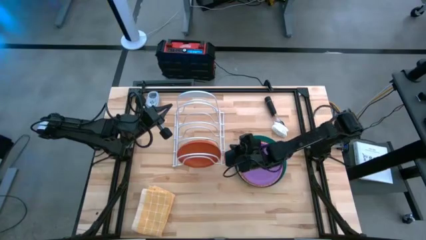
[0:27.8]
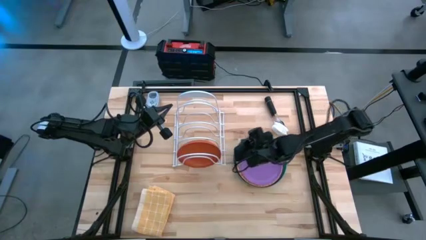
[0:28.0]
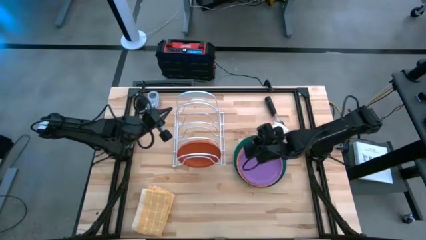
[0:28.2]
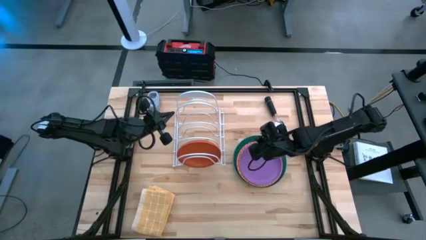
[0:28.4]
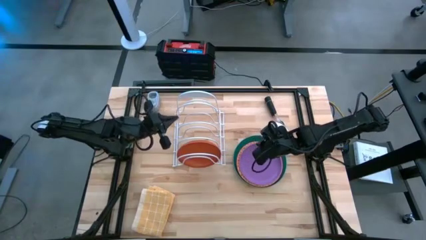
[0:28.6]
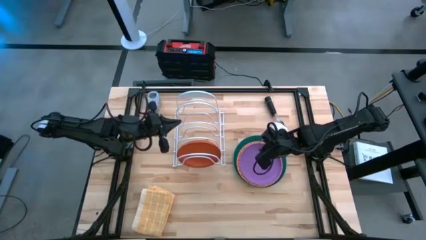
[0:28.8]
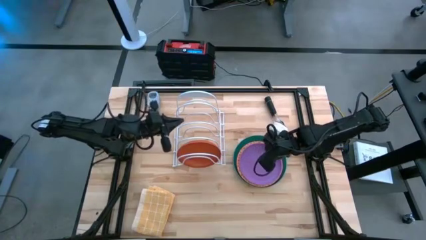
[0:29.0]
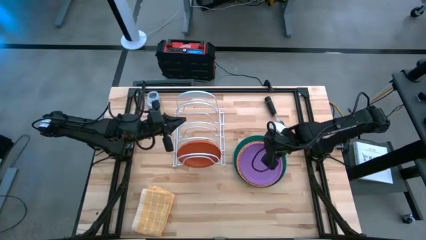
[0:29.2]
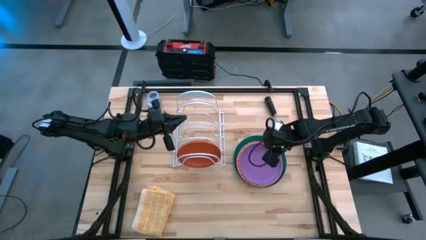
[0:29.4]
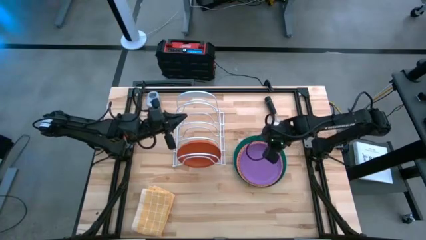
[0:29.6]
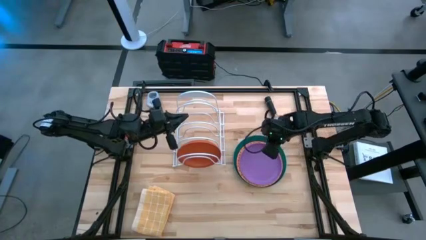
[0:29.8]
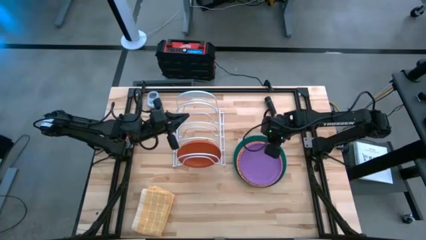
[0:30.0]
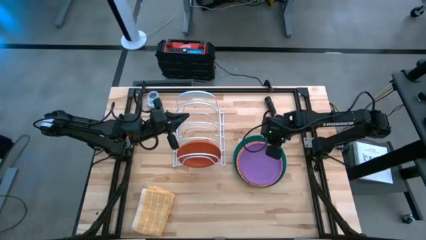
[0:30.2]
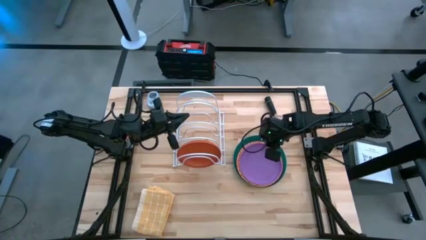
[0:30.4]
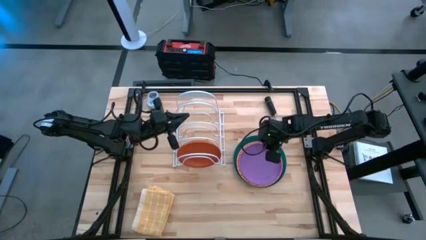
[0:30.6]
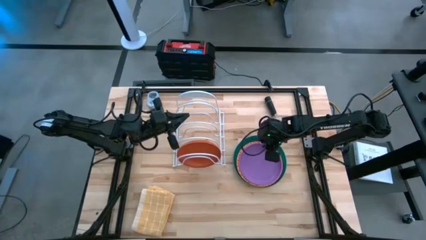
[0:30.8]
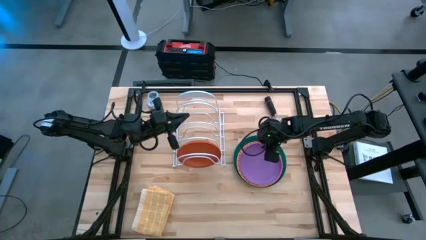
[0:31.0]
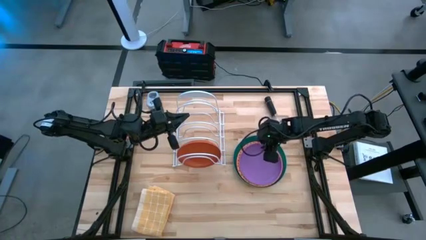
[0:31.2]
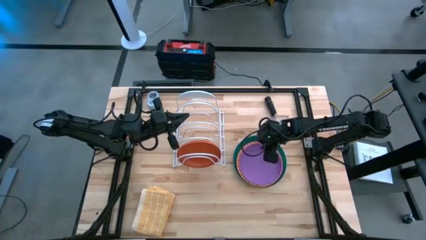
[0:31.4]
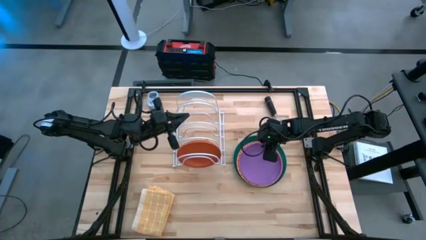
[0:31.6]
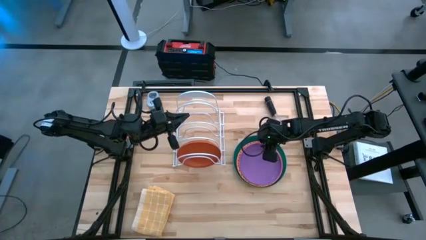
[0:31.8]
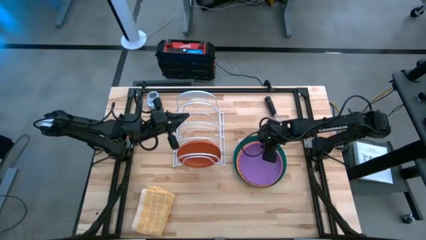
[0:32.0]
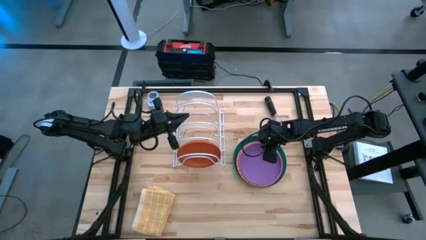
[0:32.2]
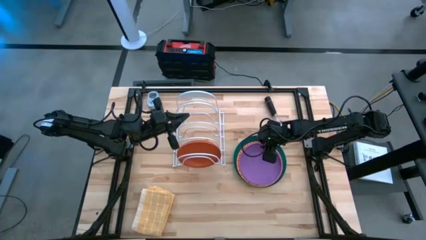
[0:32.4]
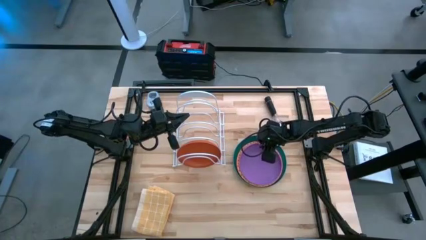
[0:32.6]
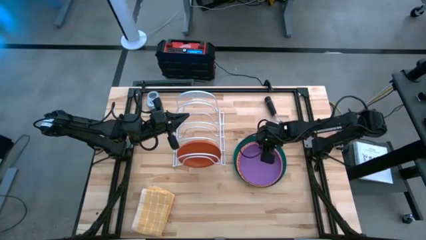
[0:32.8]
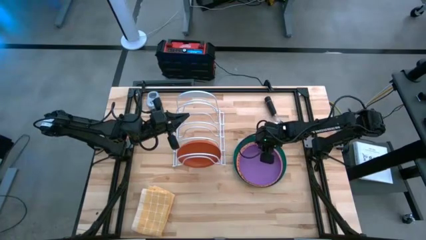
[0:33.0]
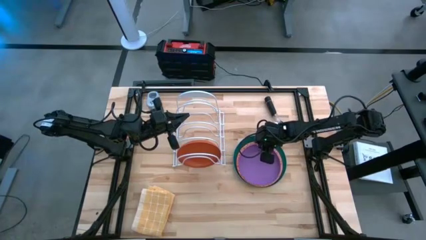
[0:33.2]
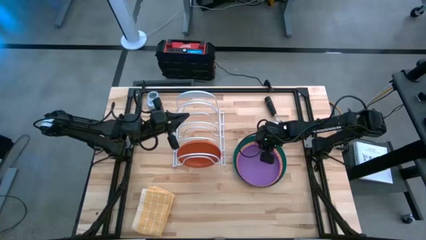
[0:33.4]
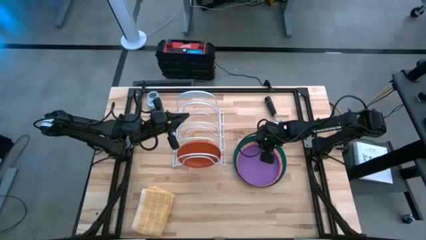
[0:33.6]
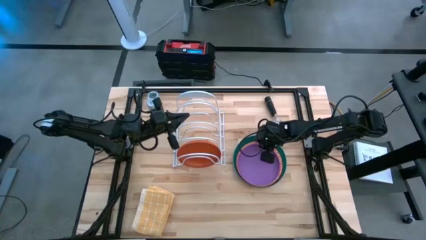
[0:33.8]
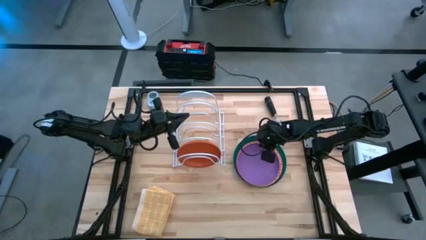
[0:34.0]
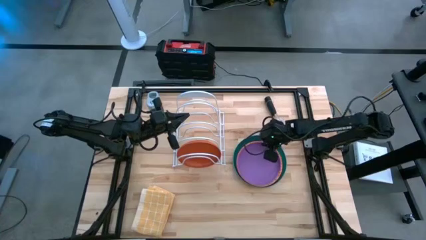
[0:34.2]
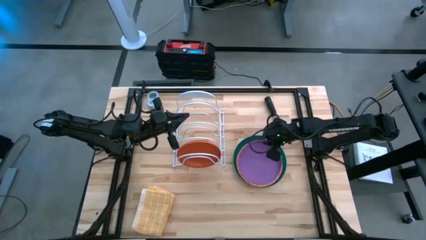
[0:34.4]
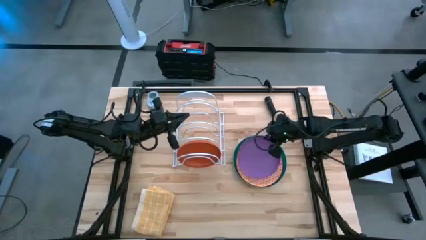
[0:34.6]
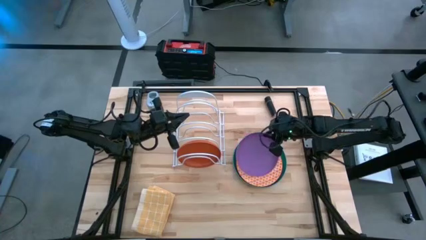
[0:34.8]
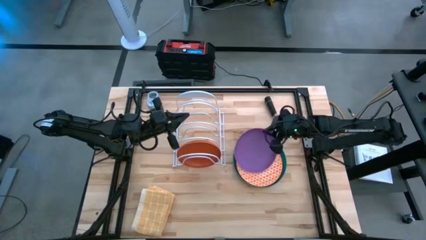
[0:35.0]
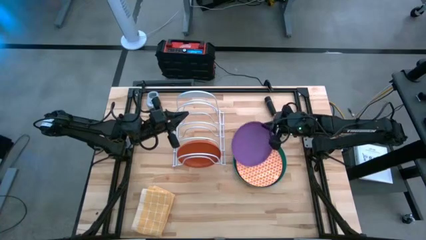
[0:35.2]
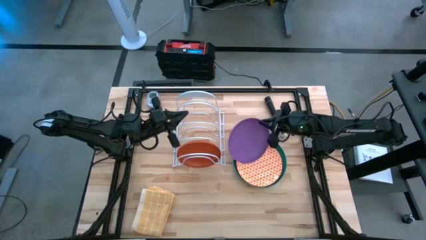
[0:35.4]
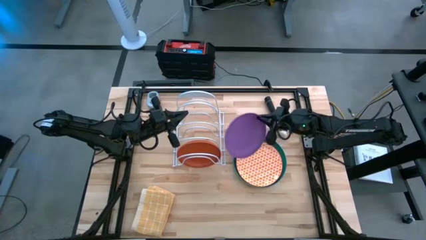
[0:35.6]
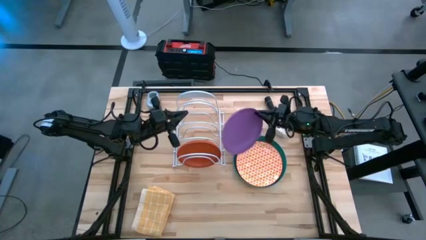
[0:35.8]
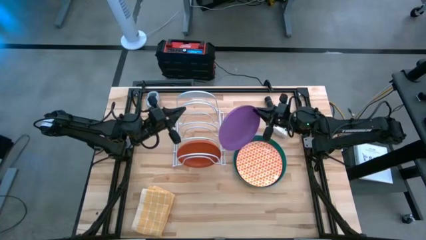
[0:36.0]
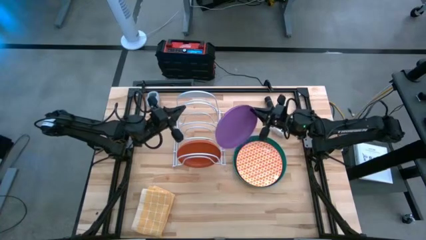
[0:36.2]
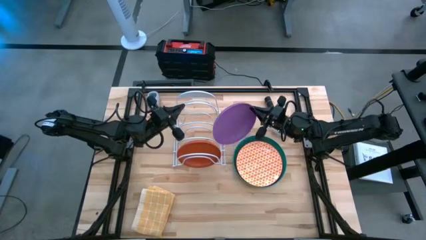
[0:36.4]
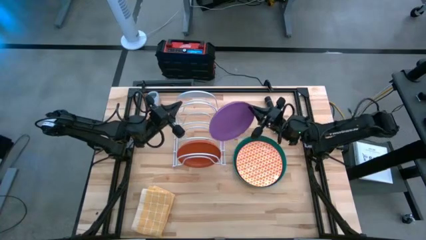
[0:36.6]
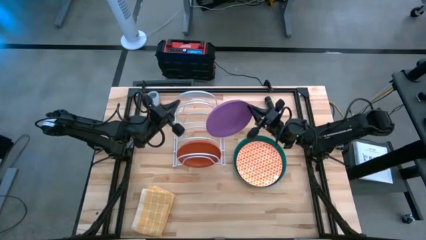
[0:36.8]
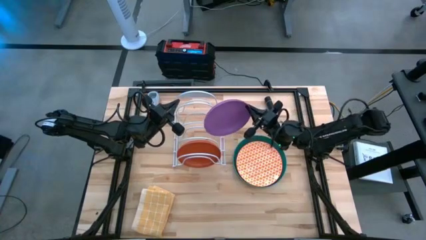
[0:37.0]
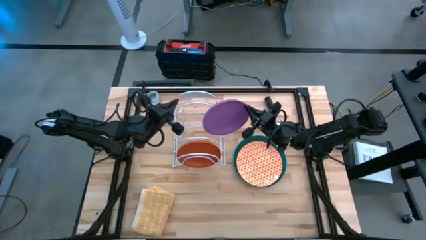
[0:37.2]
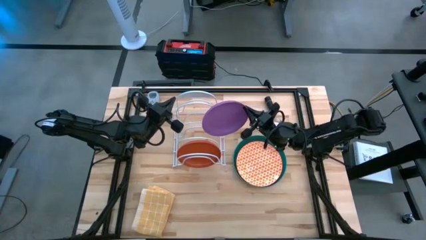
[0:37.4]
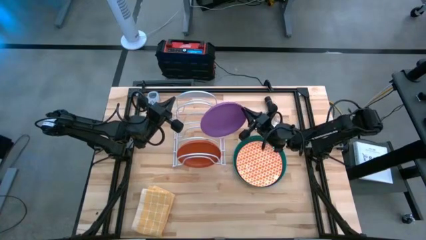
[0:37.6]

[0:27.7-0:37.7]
Task: Sort dishes
Put the purple plate into the dish rack

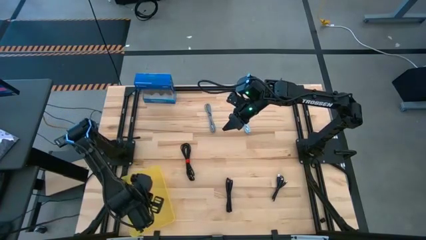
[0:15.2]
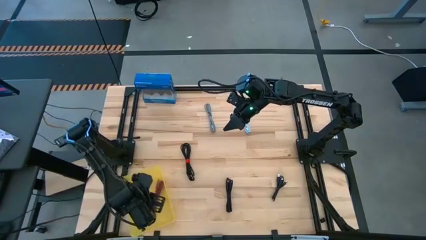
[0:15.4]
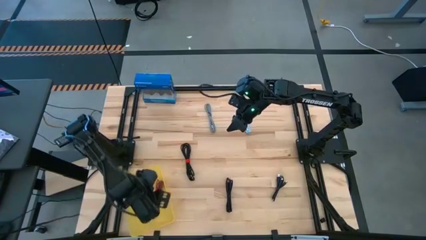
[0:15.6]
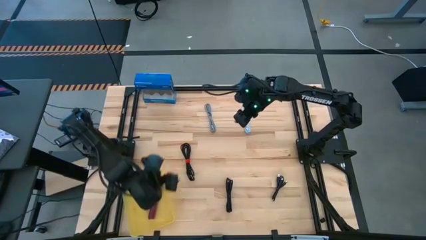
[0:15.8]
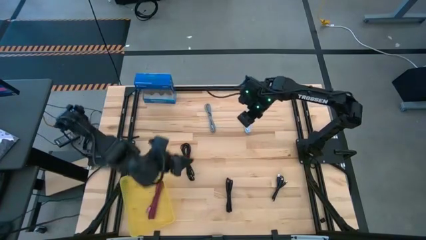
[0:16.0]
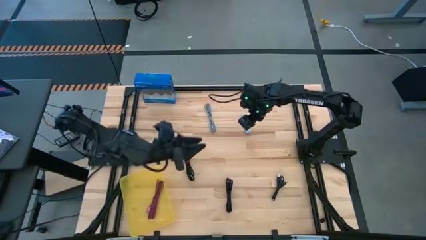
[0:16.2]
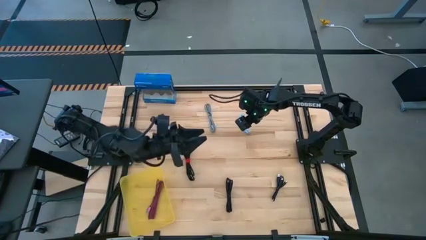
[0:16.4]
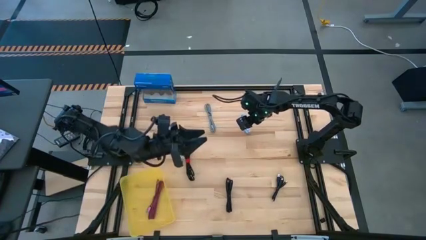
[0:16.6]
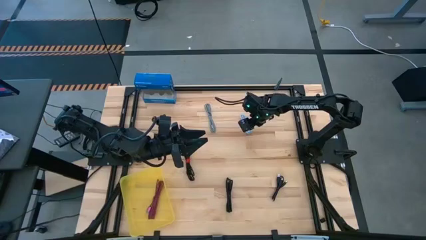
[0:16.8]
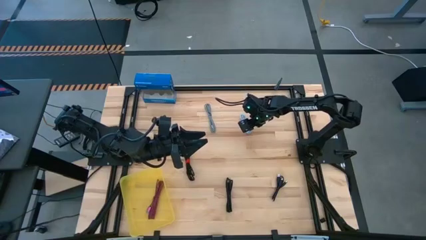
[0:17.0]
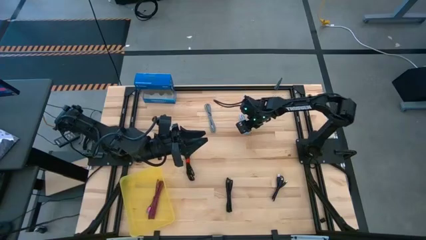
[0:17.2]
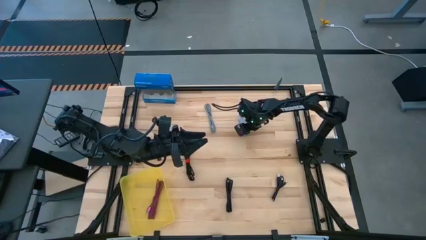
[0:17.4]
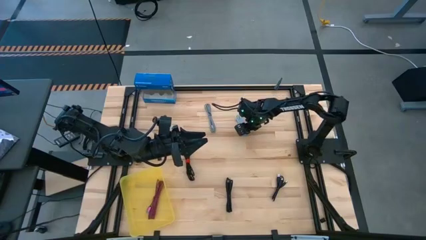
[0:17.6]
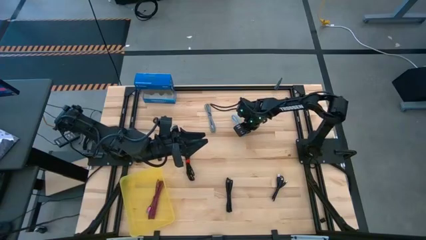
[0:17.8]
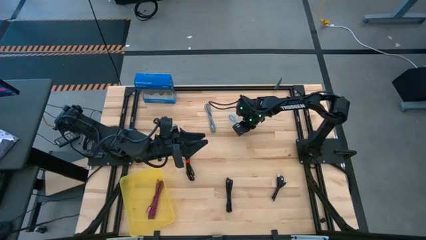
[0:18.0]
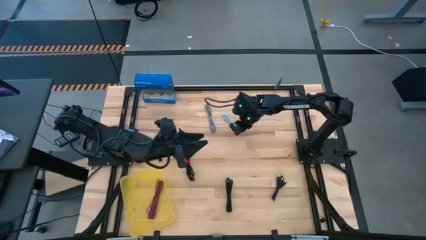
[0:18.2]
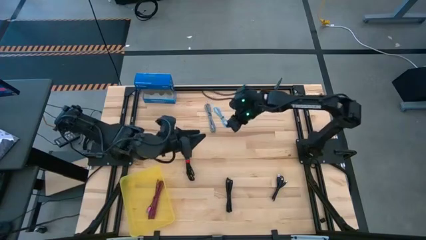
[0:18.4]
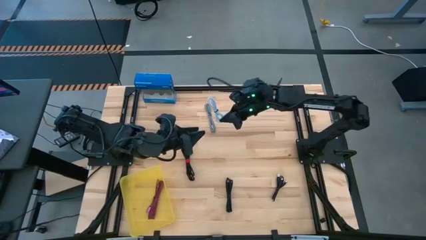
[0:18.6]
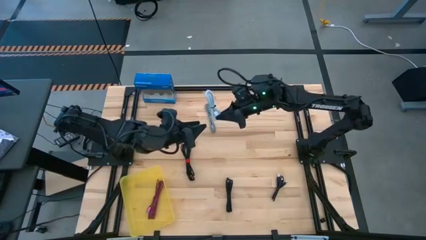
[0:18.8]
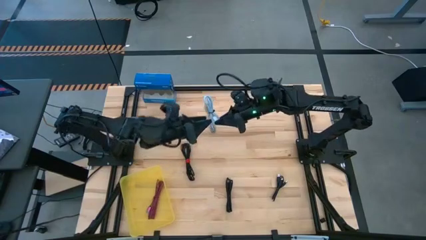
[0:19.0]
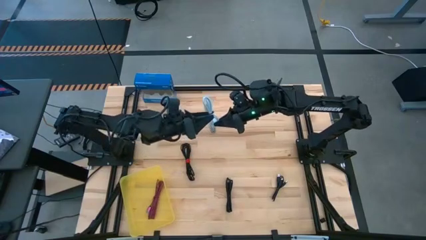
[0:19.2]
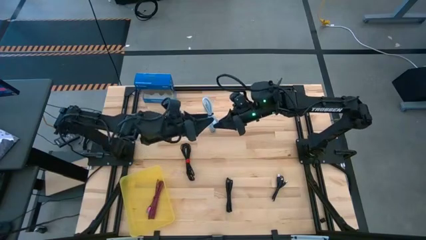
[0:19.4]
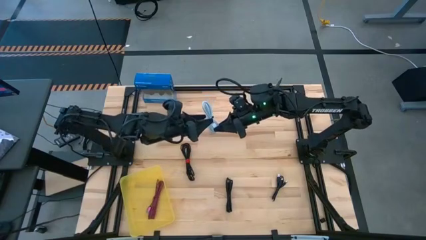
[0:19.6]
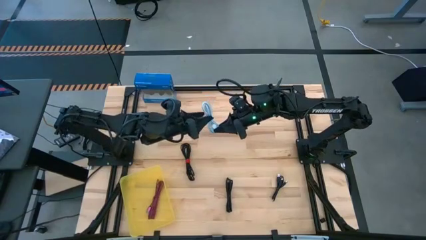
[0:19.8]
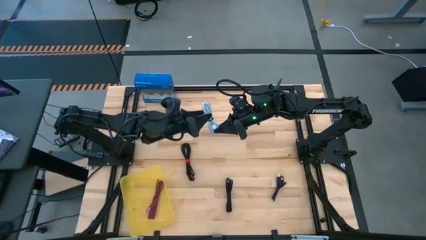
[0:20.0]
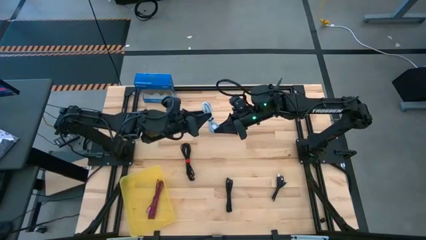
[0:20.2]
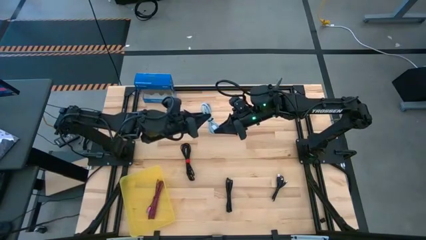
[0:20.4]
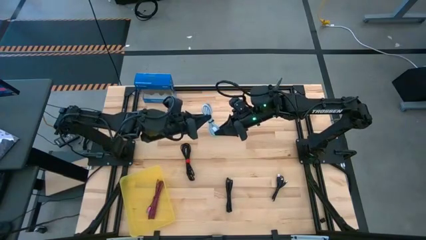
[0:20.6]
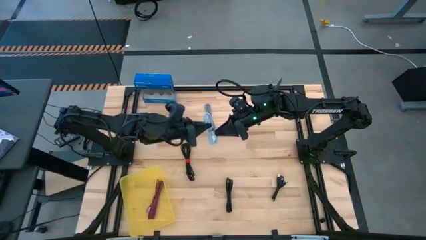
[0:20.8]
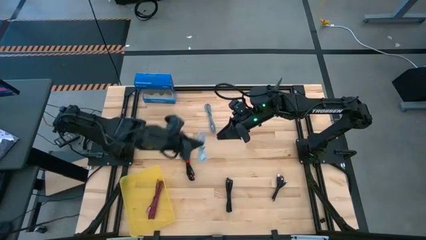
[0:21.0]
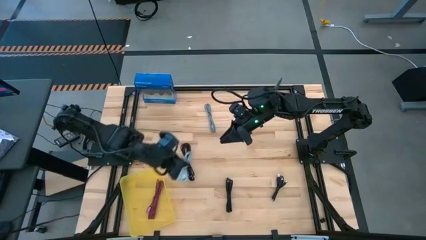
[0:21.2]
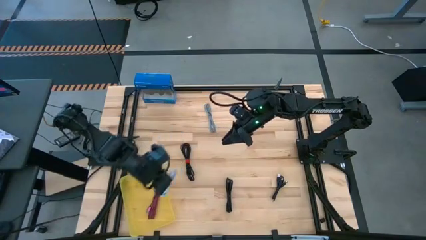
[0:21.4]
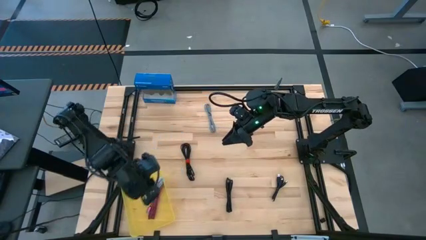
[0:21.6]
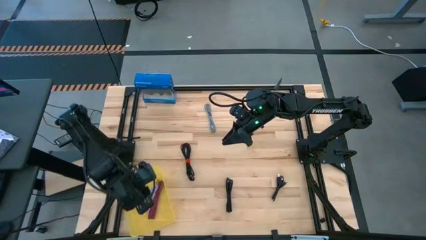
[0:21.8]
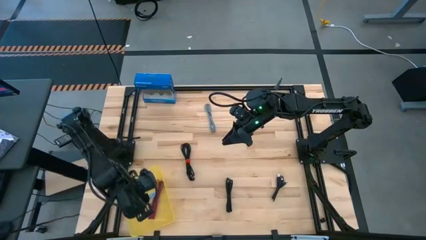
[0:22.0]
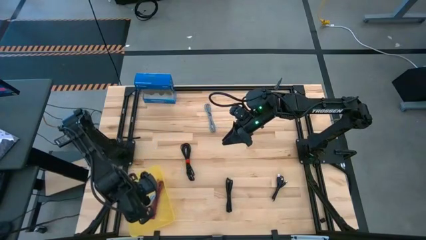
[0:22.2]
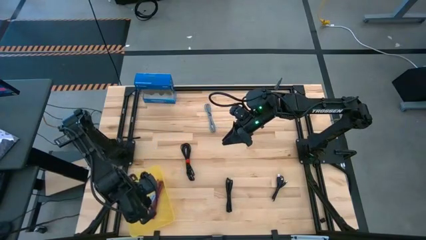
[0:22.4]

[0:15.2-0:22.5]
Task: Pick and place USB-C Cables
Put the light blue charger cable into the yellow bin
